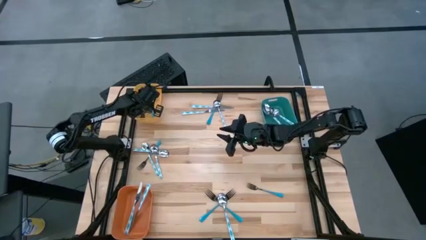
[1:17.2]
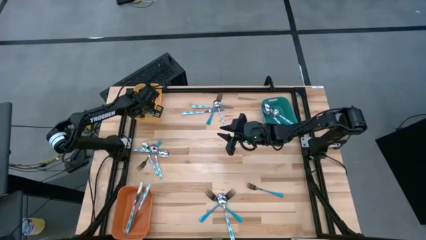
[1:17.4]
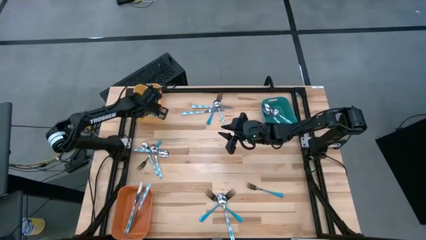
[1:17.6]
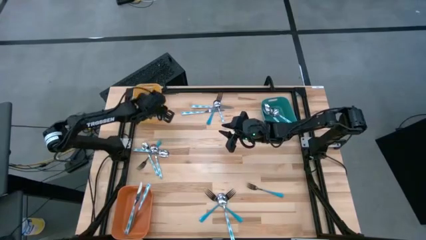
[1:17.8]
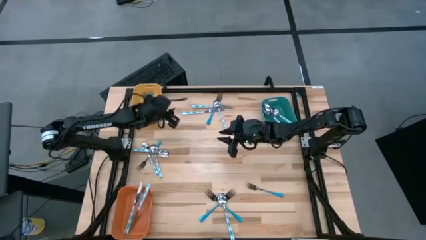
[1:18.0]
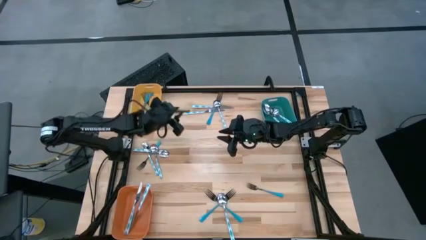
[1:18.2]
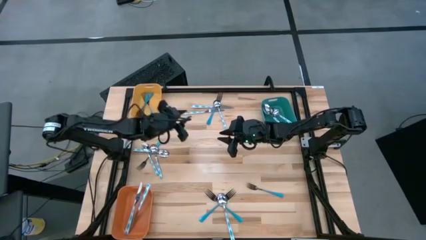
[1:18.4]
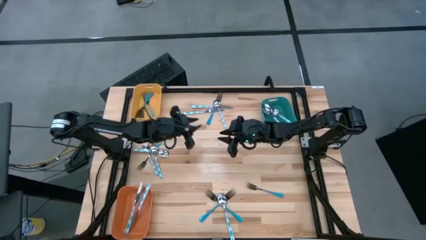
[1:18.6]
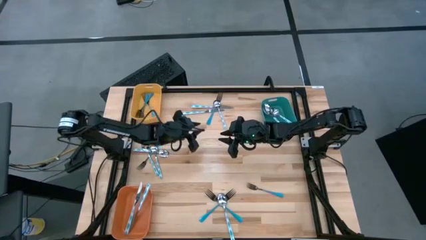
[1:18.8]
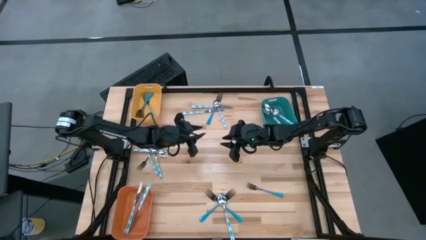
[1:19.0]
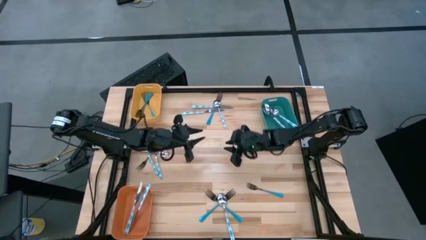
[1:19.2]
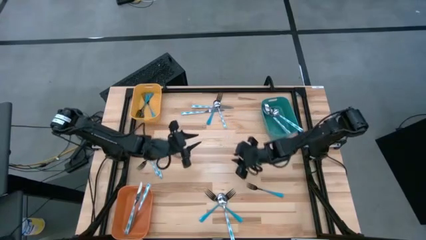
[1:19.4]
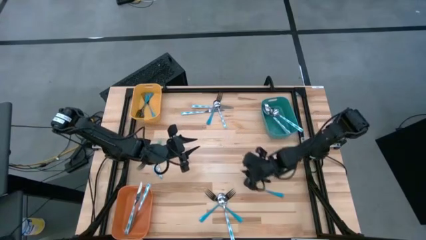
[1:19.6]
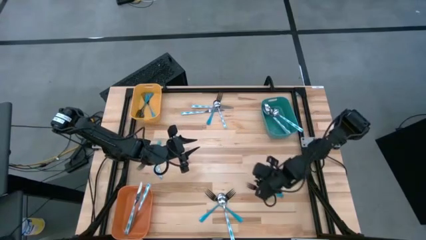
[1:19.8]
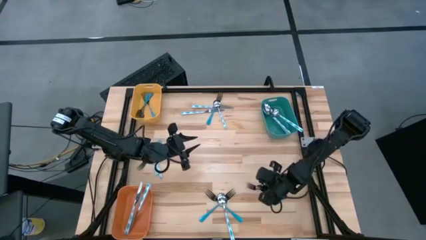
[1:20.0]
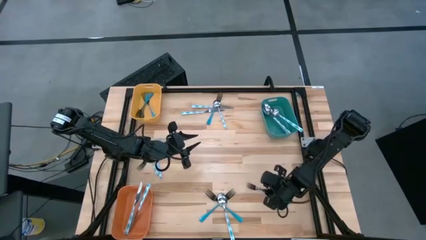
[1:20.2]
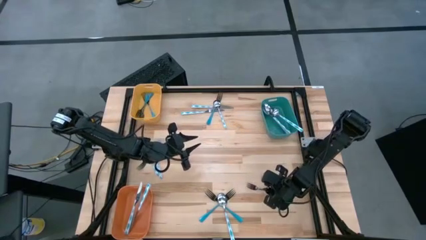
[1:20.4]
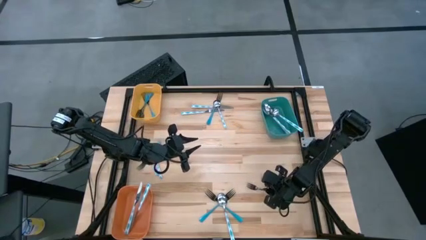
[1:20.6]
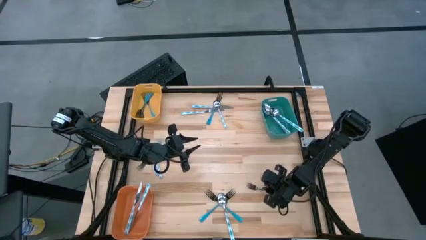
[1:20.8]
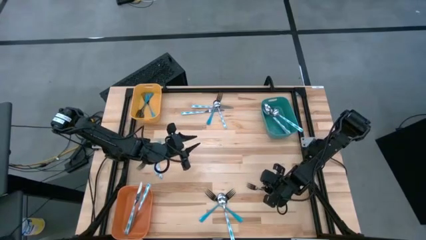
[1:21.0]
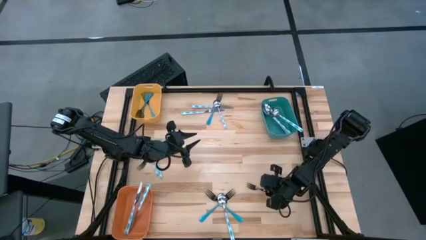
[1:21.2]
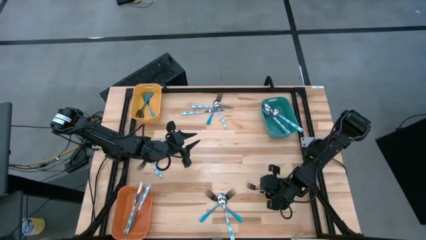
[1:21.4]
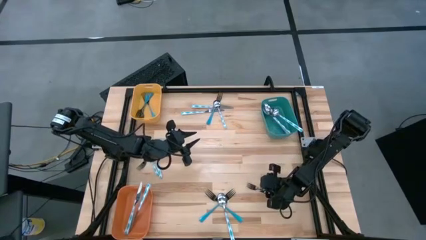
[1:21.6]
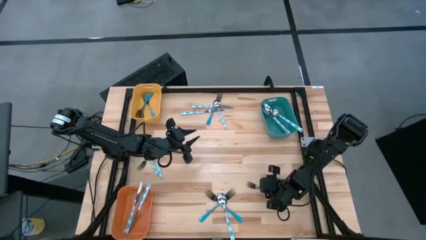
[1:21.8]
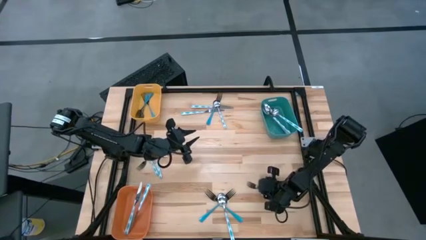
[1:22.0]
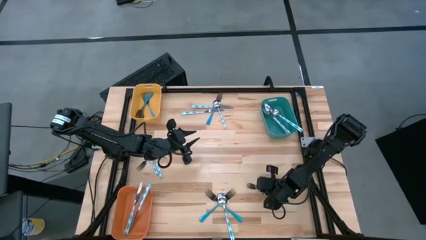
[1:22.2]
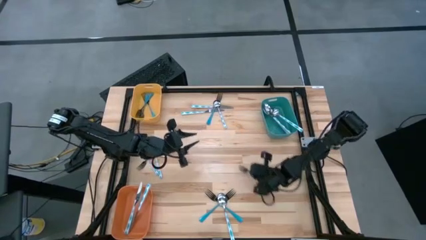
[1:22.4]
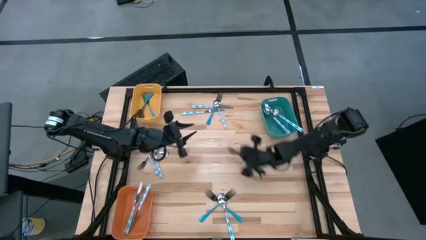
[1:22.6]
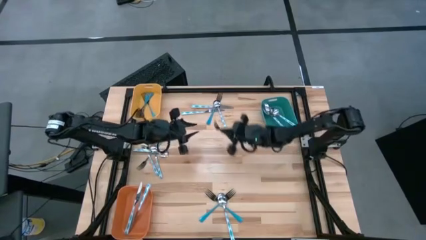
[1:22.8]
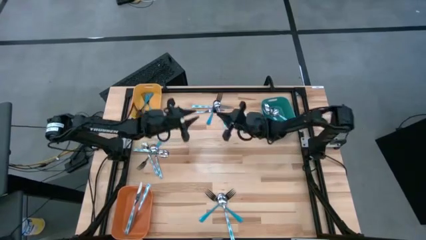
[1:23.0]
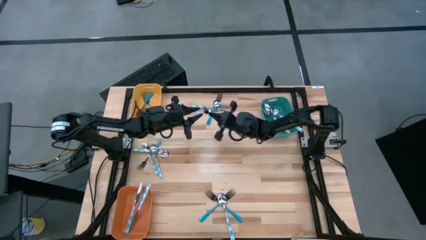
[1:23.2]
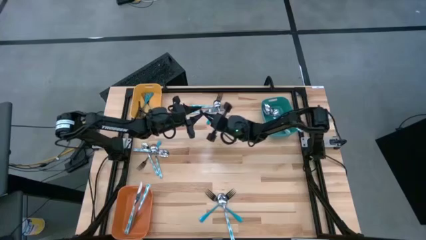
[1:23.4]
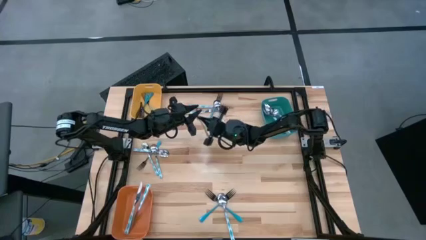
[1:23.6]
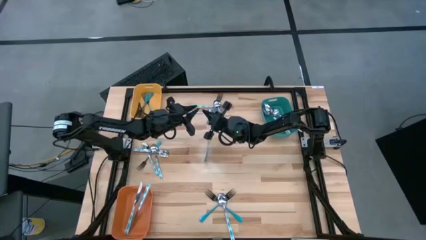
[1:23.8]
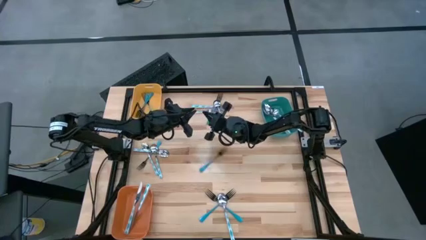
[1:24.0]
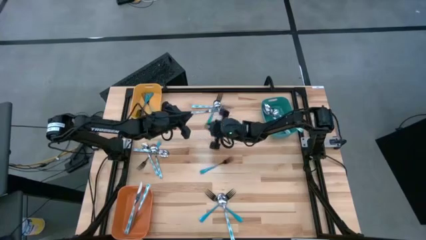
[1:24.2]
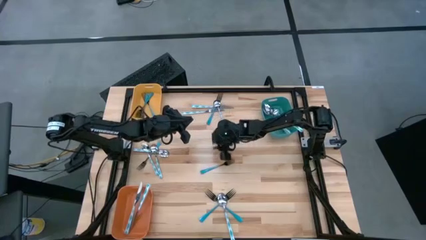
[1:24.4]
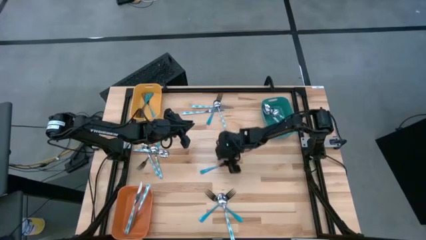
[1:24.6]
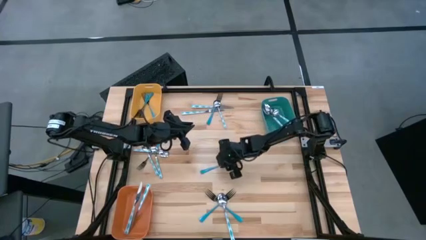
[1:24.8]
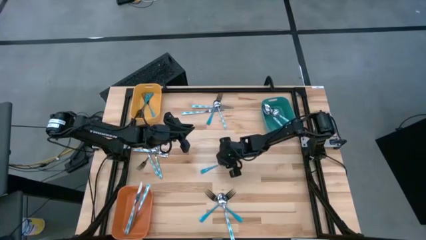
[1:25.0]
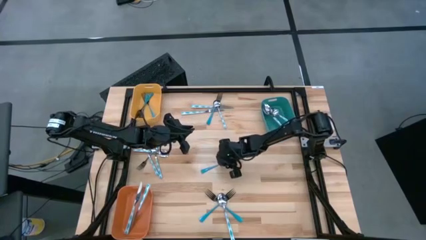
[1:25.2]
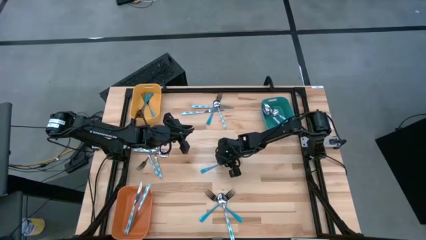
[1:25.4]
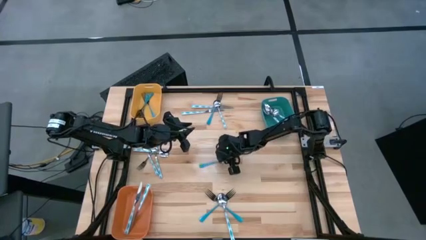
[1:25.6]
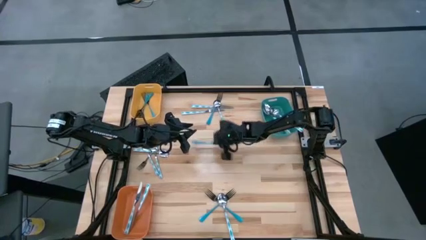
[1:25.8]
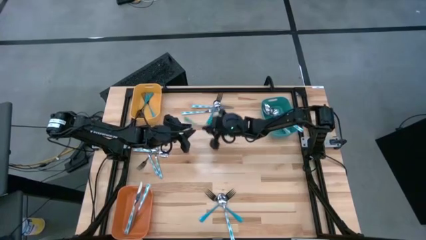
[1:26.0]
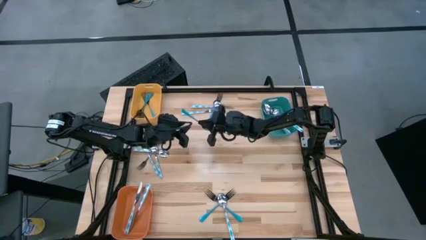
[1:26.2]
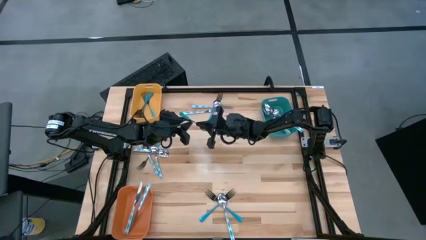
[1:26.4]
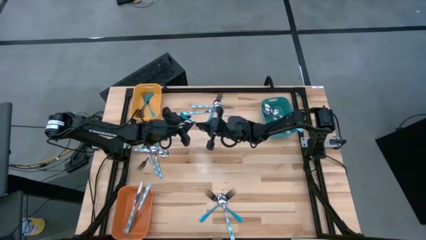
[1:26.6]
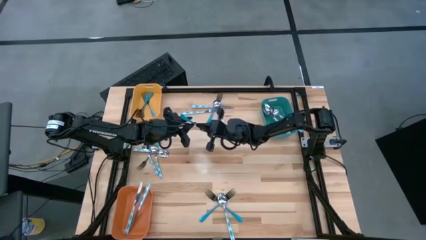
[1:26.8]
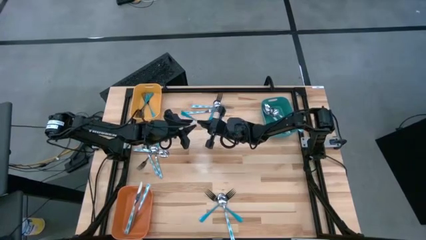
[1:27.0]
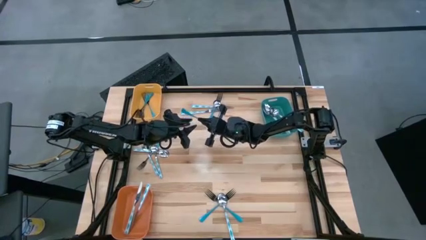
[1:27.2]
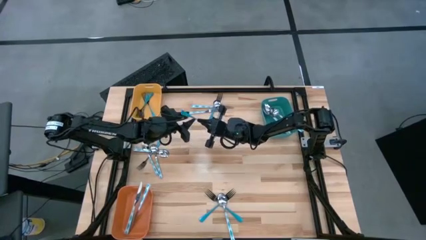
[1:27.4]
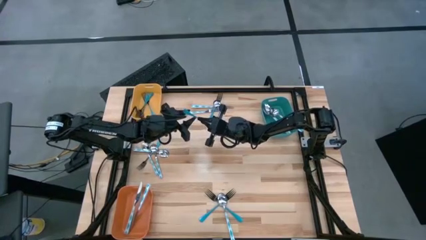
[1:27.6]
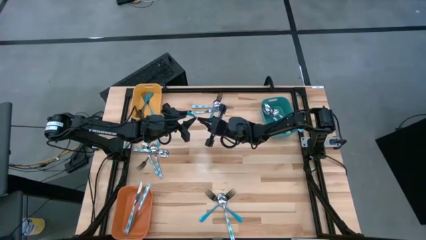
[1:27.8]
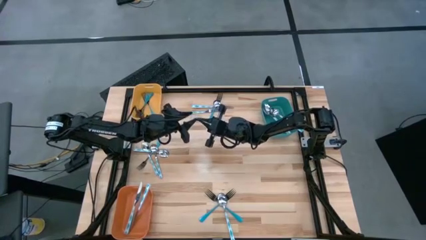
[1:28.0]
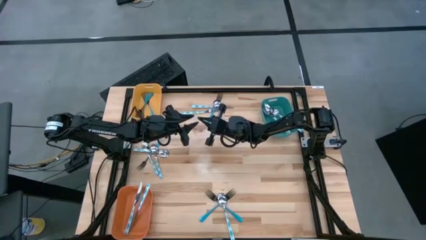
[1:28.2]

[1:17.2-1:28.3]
Task: Sort silverware by color (type)
Put the blue fork into the yellow bin

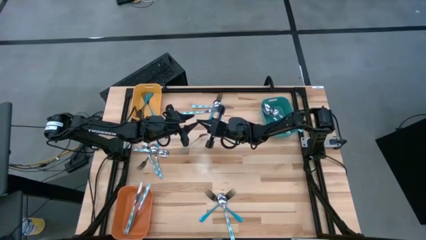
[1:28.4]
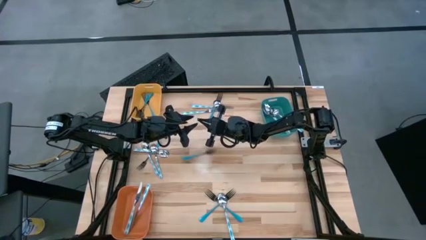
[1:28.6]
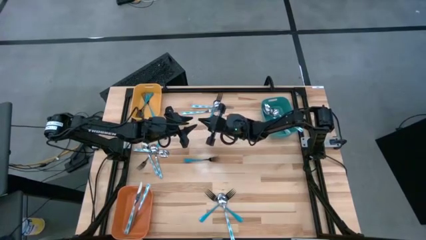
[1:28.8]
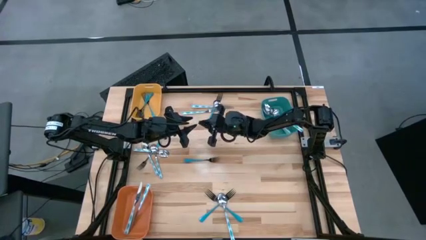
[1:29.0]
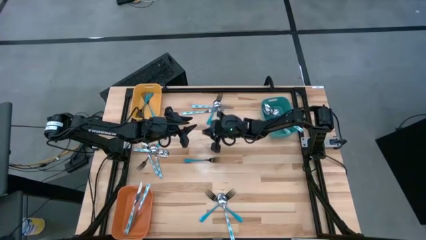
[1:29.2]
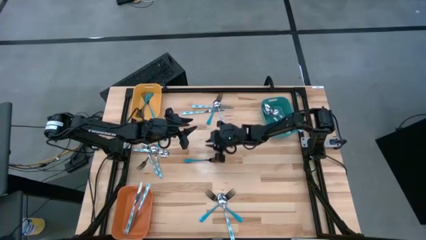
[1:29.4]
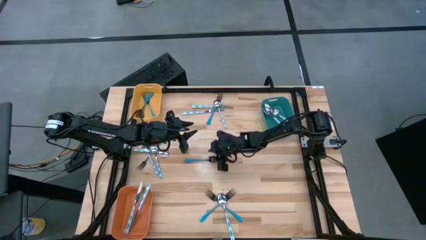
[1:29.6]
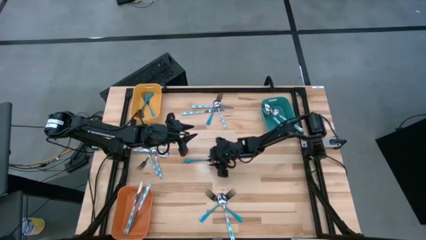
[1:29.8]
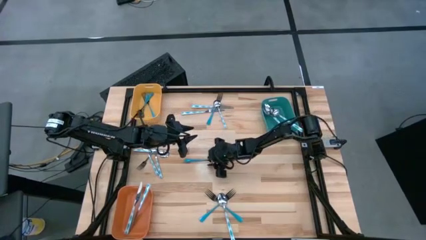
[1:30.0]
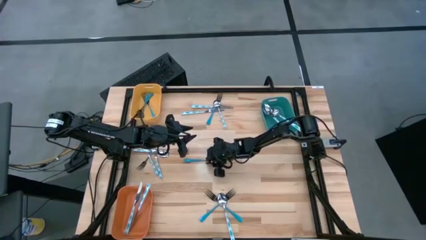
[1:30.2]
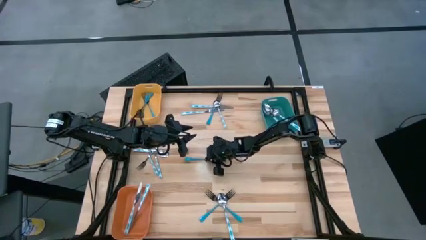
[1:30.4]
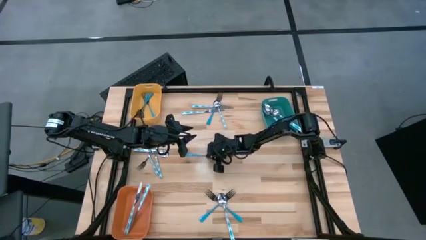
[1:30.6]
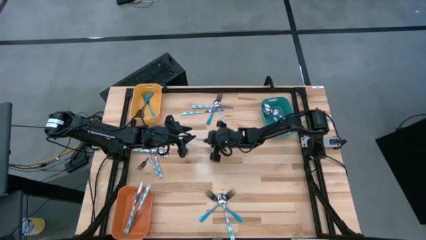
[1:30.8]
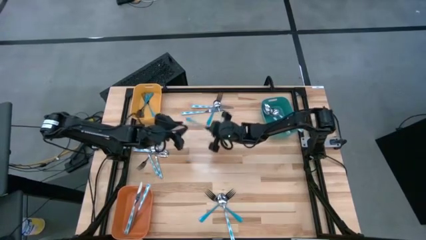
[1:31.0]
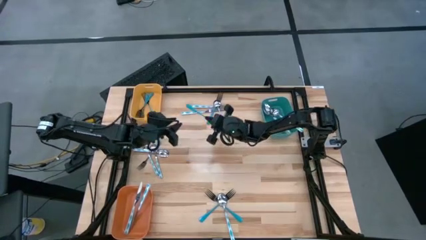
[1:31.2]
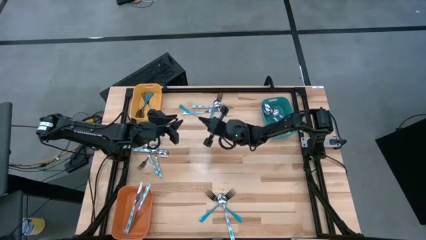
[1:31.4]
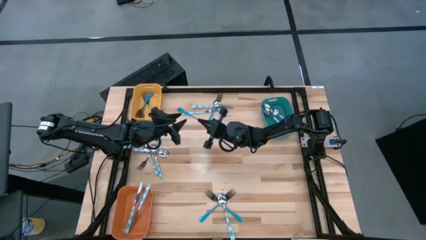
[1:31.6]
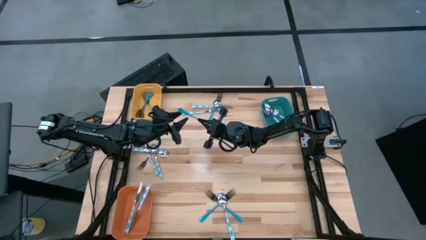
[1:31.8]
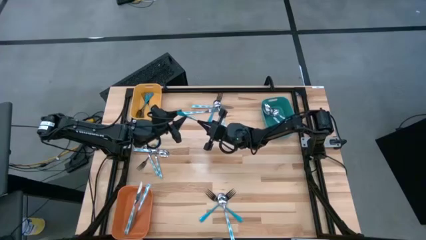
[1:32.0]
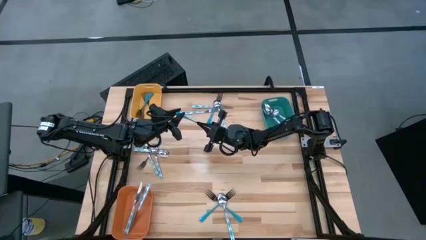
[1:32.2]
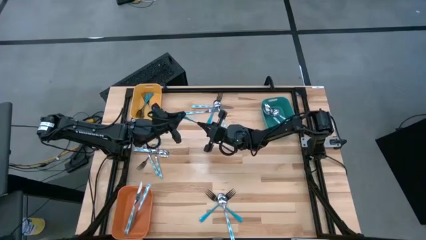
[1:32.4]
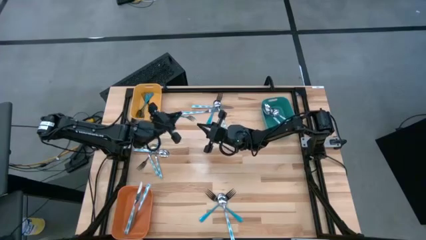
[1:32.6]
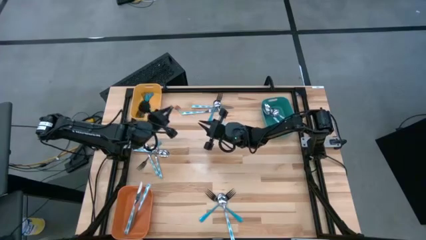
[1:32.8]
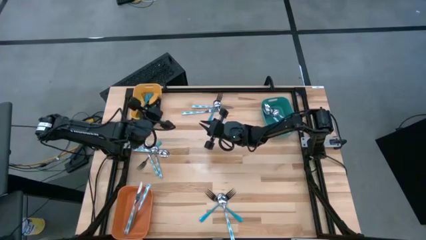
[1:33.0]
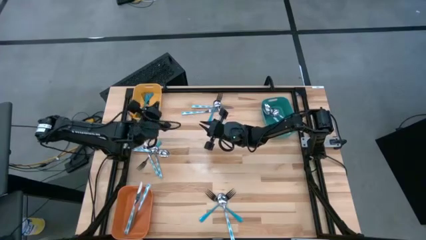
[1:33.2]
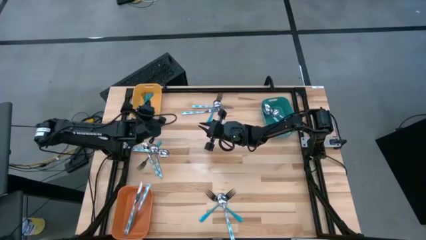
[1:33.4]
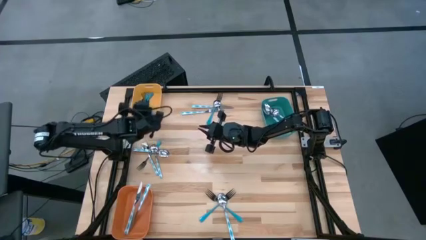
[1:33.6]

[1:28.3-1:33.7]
Put the blue fork into the yellow bin
